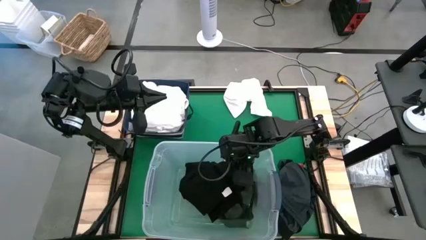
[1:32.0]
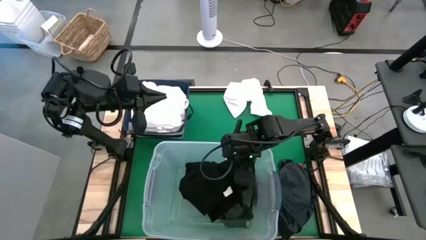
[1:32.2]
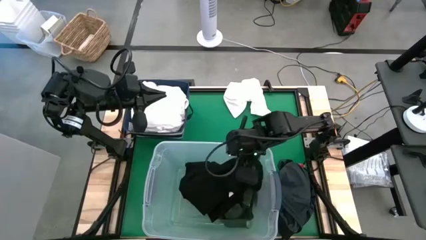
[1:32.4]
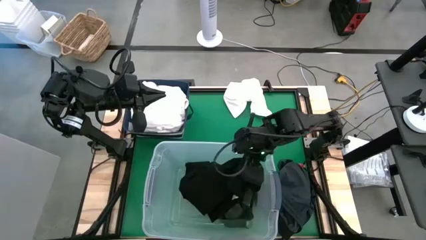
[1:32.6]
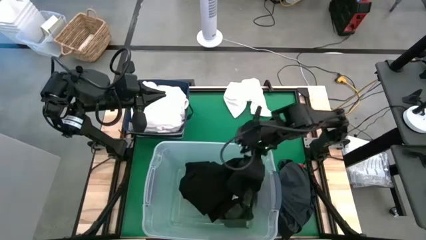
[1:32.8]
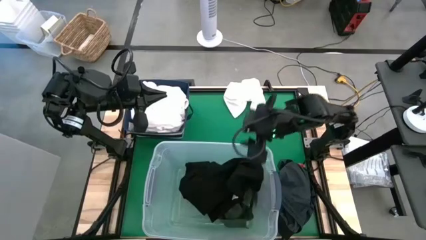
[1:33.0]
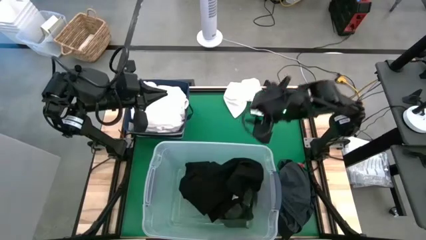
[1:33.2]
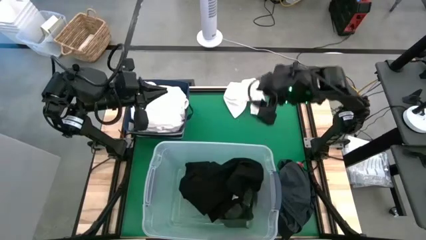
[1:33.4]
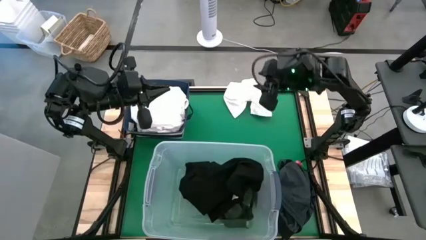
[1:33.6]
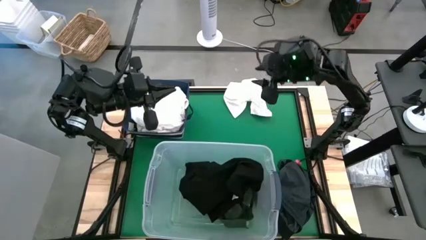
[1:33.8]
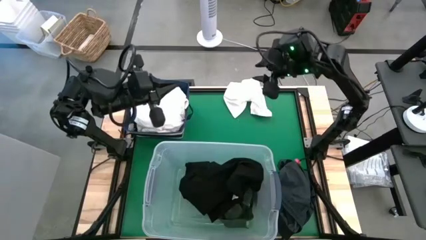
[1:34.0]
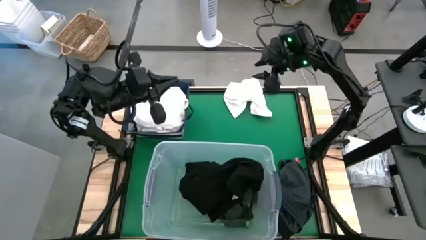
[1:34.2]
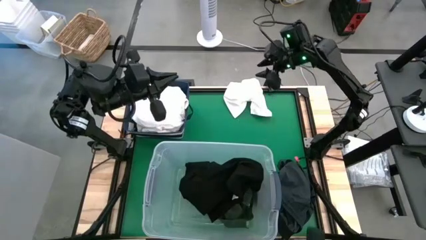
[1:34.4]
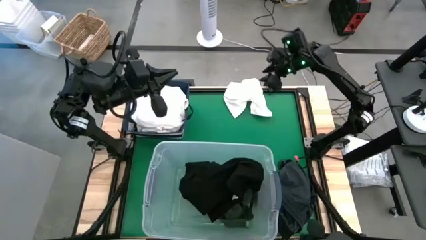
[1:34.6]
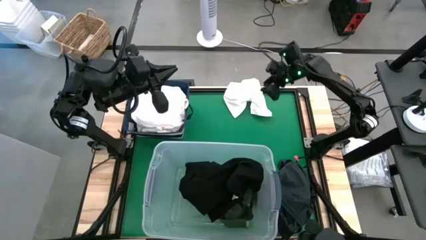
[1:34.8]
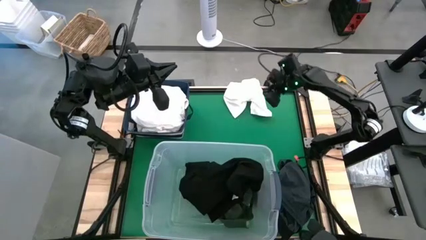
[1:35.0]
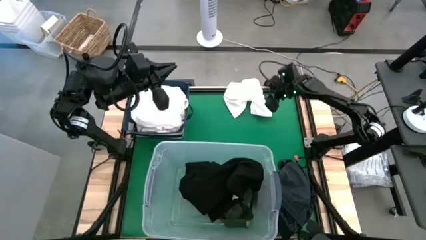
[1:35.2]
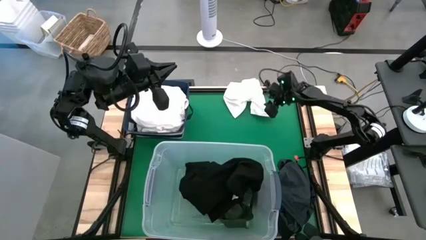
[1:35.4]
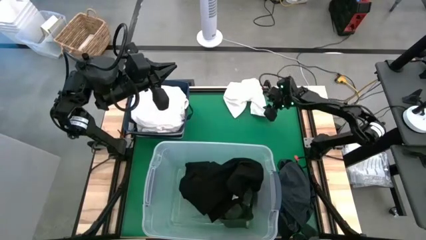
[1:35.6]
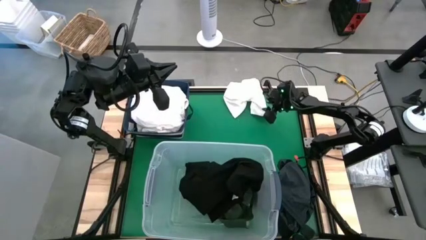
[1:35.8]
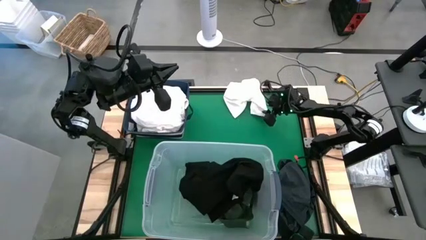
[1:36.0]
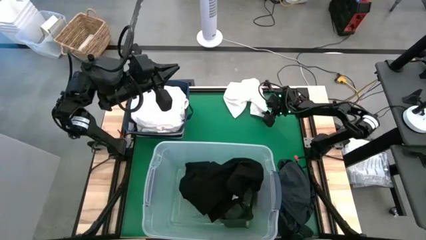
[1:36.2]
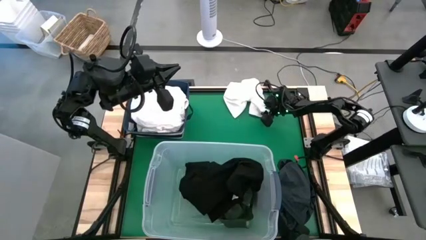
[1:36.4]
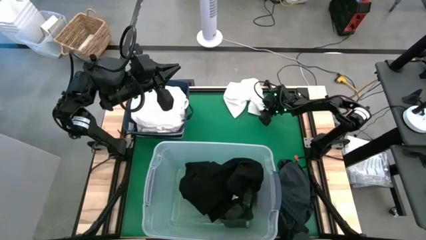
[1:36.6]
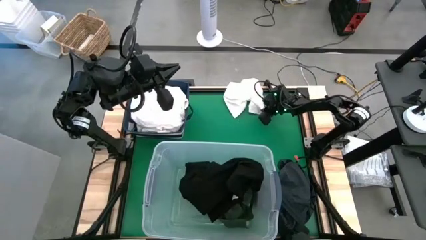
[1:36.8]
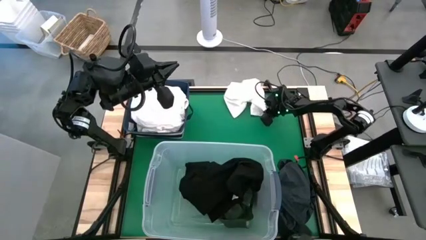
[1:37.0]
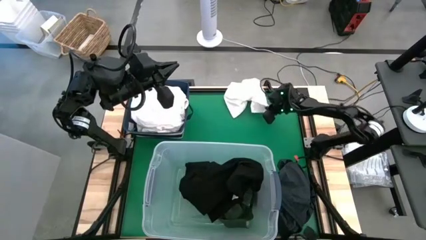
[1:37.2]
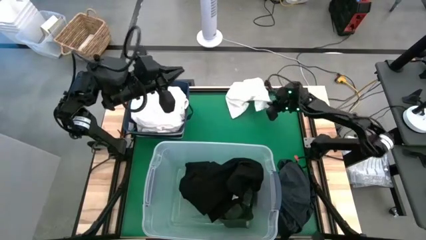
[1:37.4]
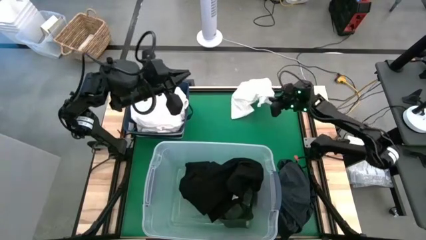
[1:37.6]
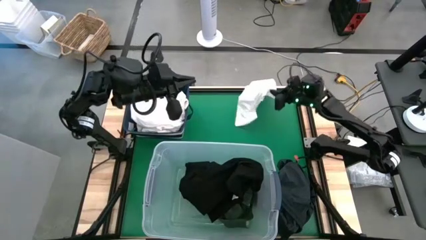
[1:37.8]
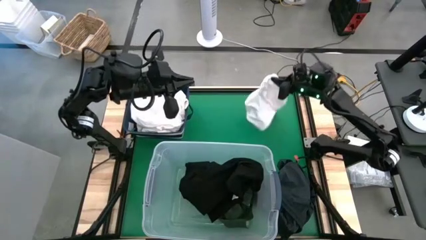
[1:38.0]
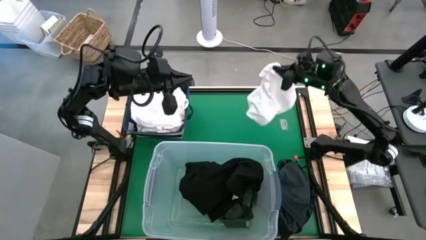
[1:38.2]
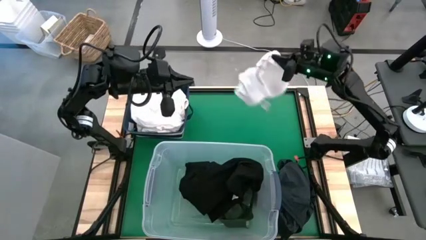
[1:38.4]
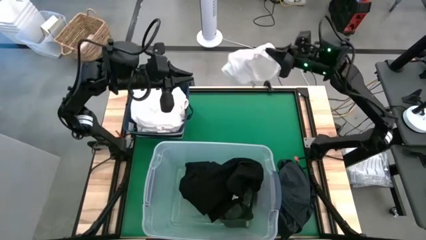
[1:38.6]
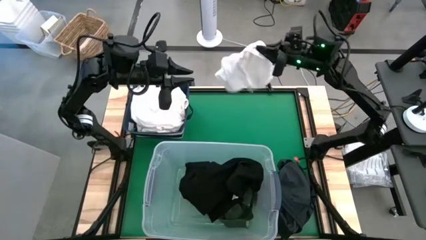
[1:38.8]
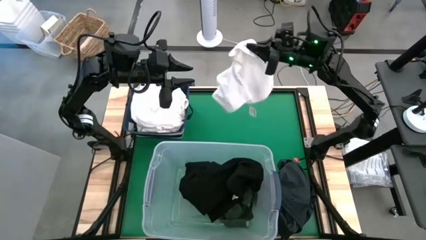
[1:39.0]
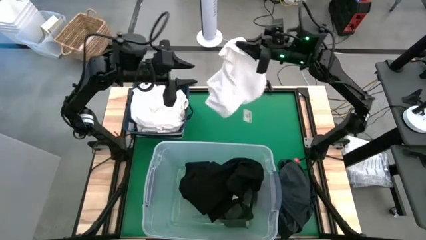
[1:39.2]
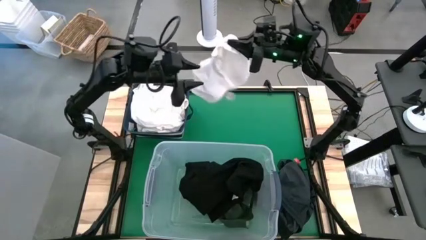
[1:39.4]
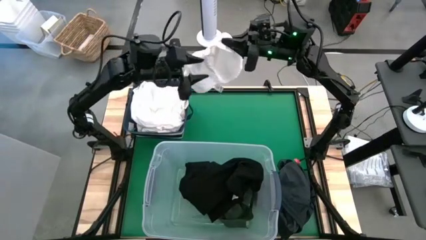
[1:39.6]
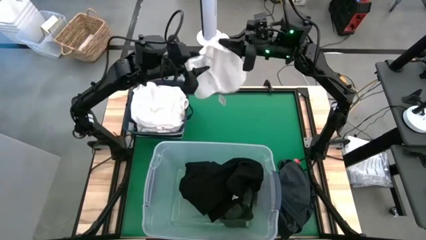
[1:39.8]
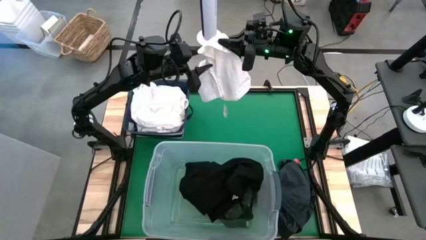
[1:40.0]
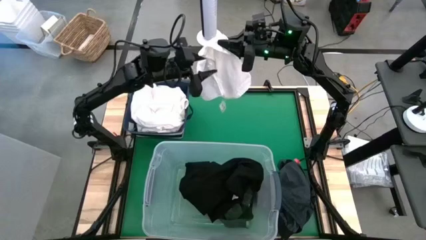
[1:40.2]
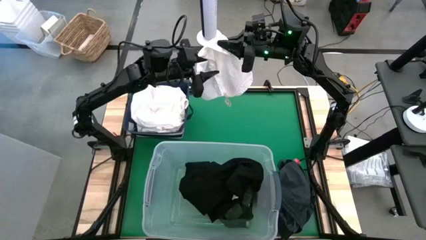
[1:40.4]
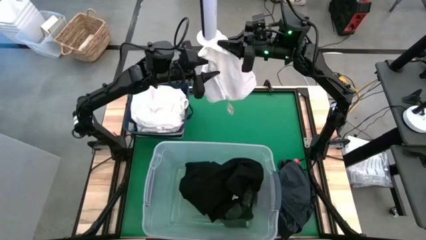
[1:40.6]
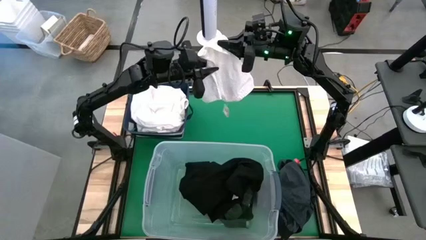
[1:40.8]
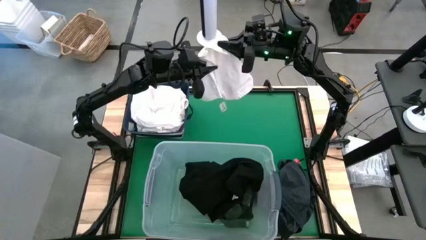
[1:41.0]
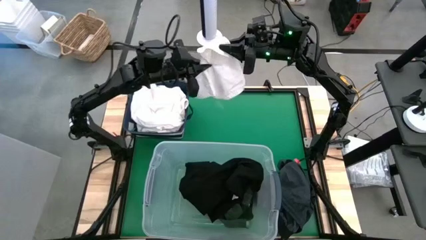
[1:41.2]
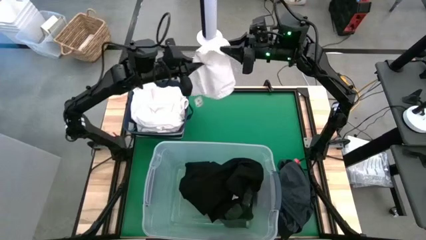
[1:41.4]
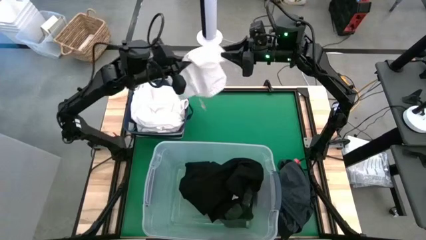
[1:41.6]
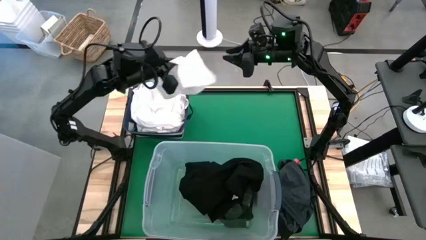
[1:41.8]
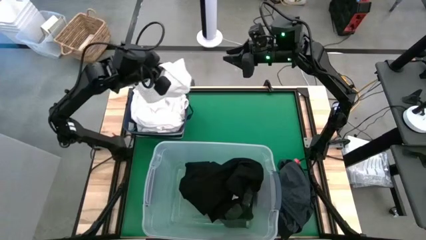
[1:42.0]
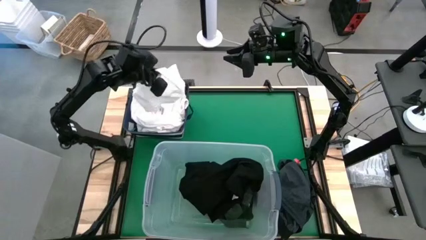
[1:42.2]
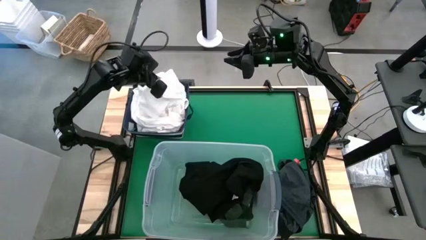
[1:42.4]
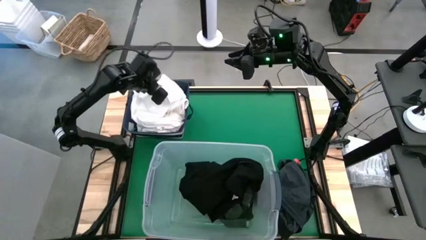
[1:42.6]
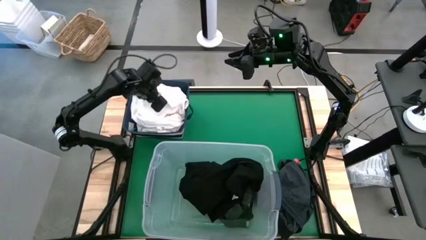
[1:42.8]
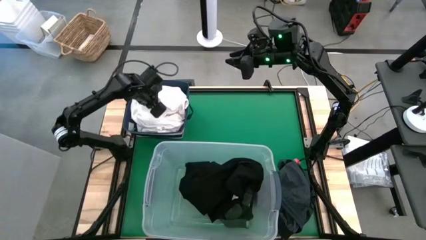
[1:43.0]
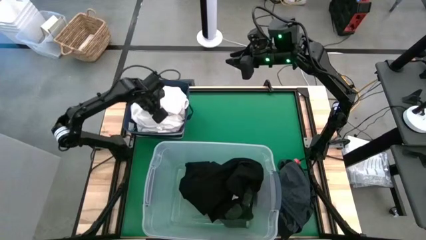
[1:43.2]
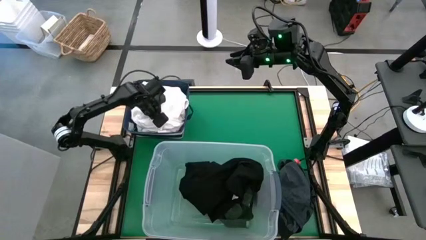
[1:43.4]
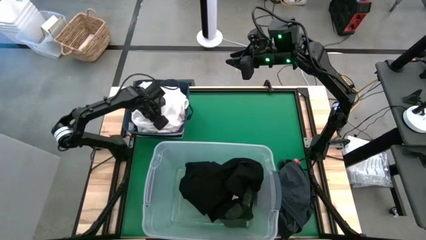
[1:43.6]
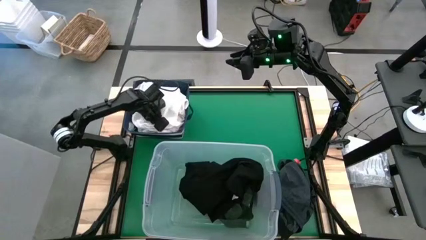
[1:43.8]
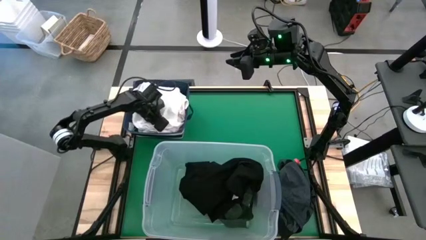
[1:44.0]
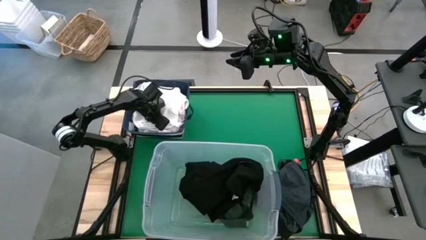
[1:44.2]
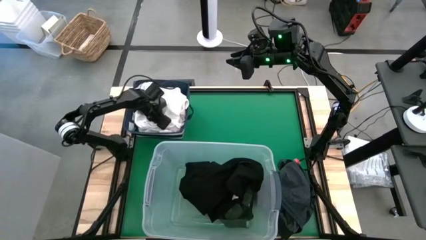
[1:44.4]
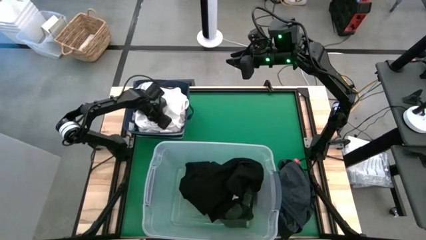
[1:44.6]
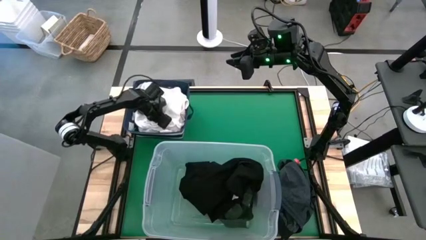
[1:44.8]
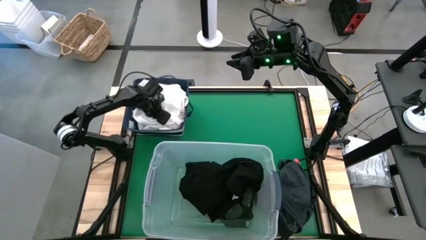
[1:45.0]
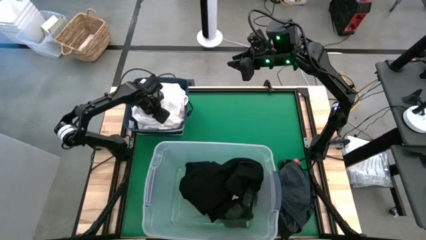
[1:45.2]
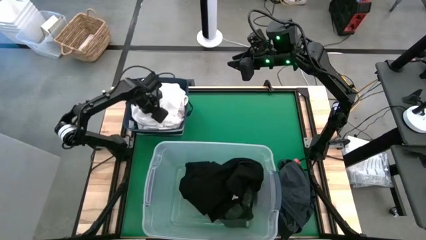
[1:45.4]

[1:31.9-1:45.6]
Put the white shorts into the blue laundry bin
